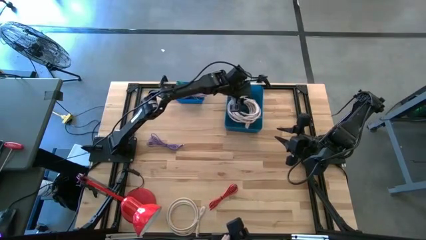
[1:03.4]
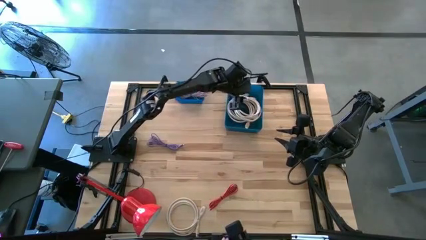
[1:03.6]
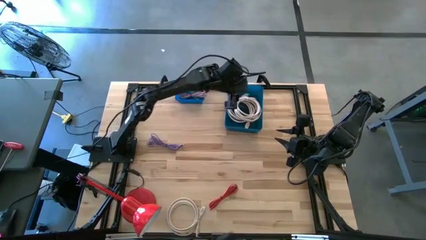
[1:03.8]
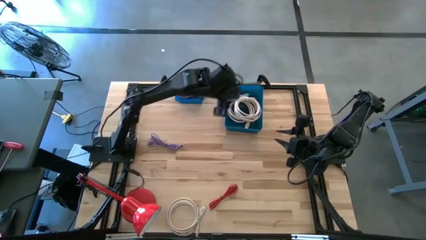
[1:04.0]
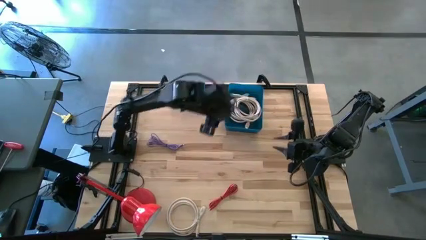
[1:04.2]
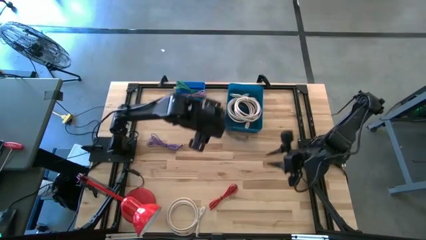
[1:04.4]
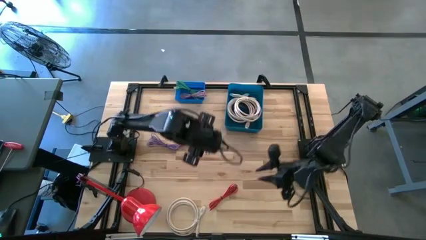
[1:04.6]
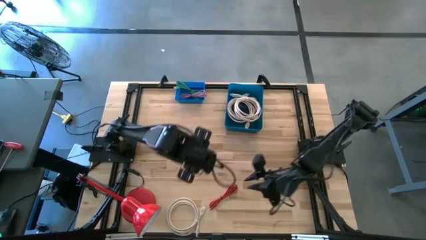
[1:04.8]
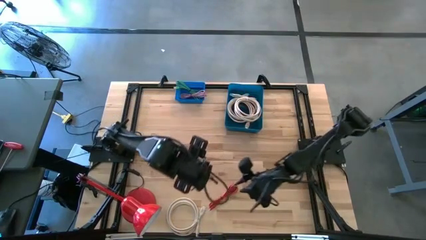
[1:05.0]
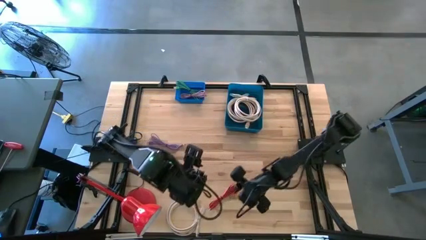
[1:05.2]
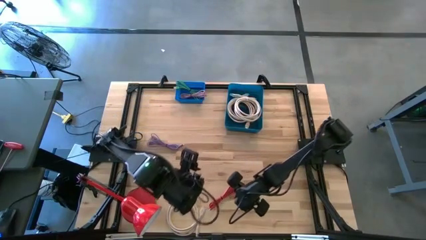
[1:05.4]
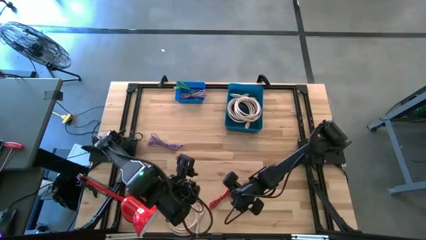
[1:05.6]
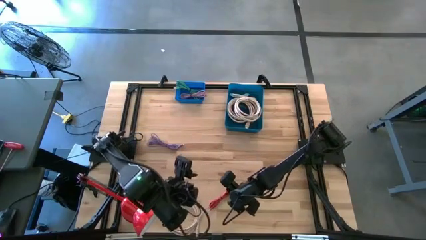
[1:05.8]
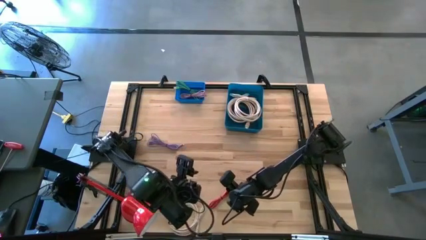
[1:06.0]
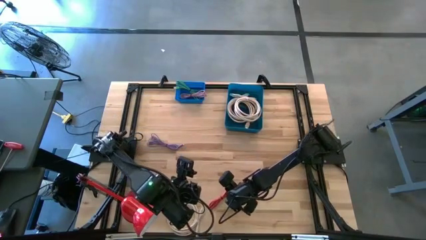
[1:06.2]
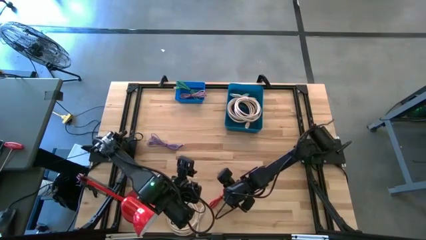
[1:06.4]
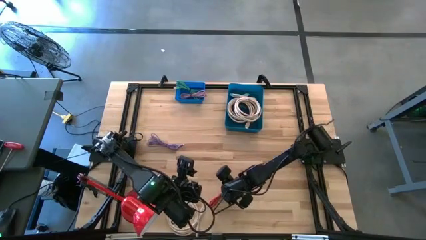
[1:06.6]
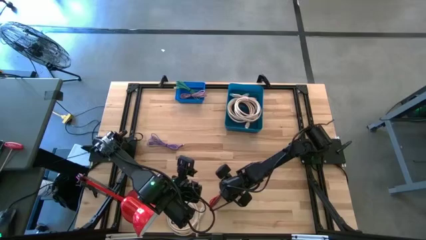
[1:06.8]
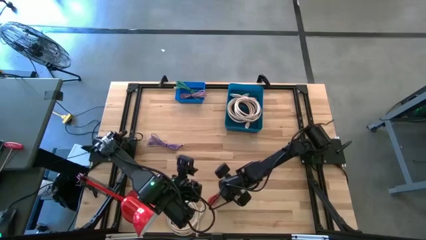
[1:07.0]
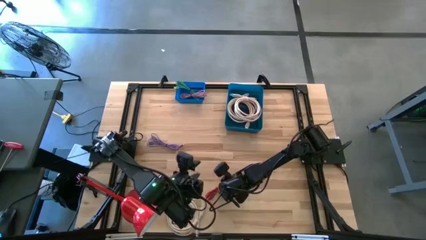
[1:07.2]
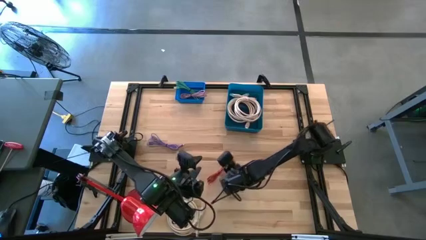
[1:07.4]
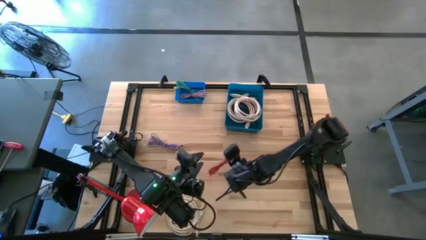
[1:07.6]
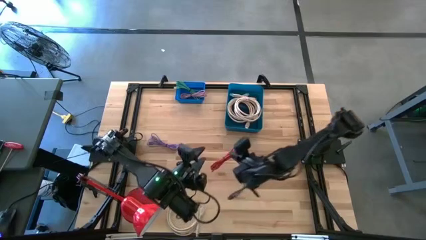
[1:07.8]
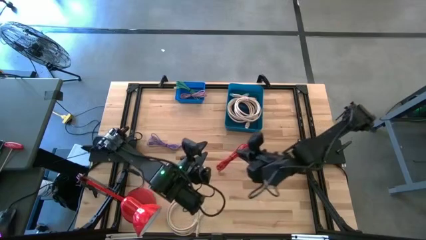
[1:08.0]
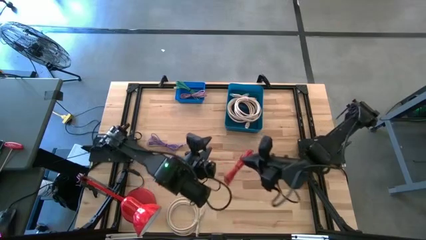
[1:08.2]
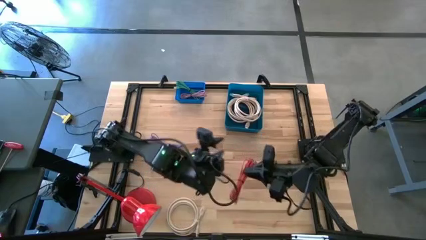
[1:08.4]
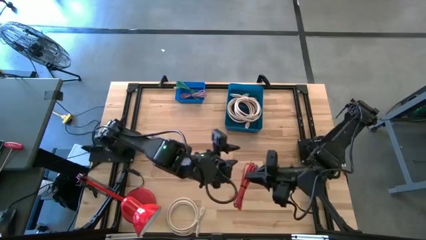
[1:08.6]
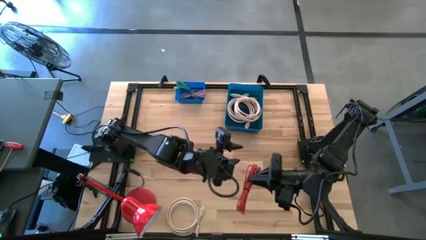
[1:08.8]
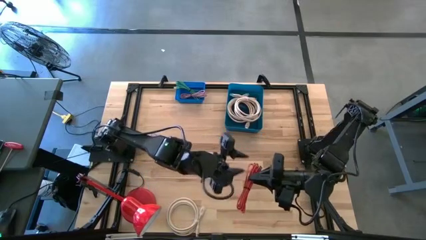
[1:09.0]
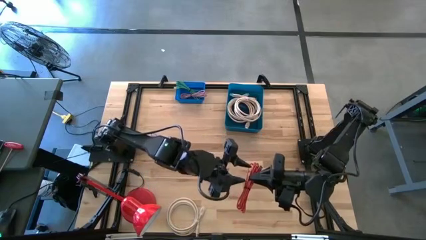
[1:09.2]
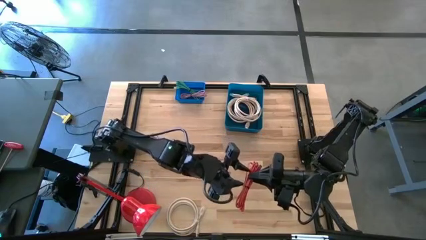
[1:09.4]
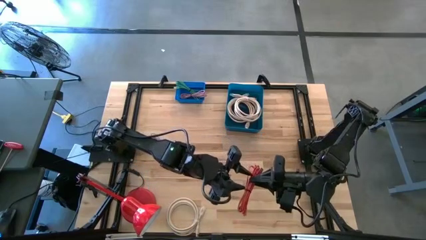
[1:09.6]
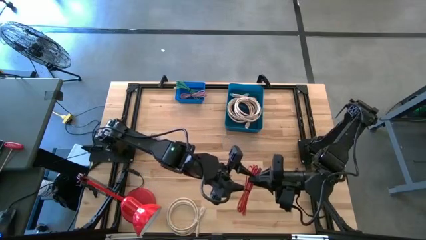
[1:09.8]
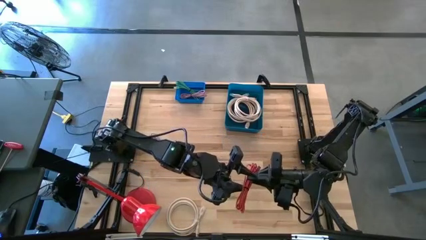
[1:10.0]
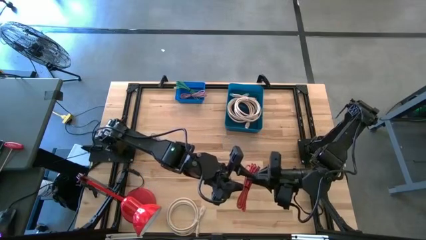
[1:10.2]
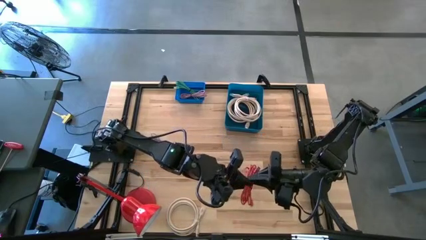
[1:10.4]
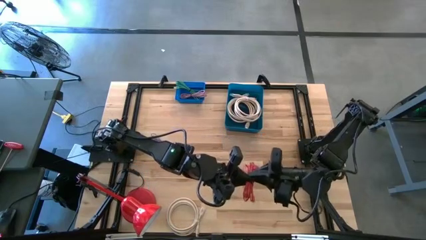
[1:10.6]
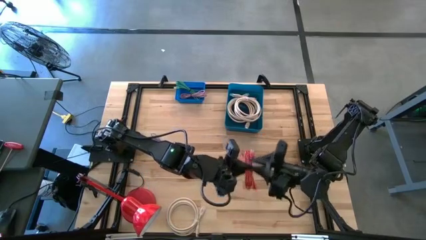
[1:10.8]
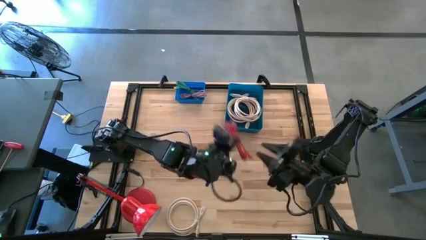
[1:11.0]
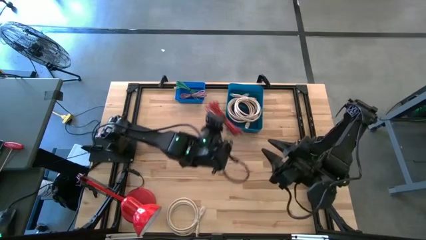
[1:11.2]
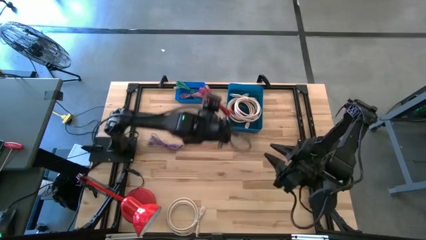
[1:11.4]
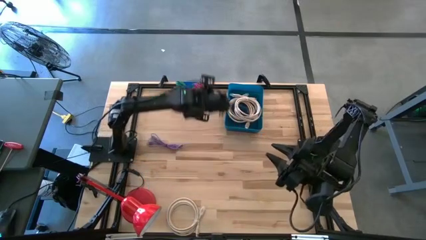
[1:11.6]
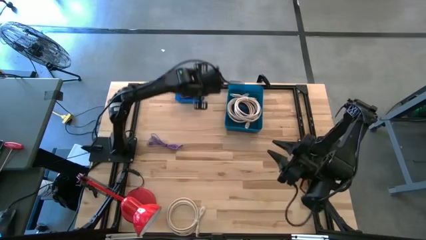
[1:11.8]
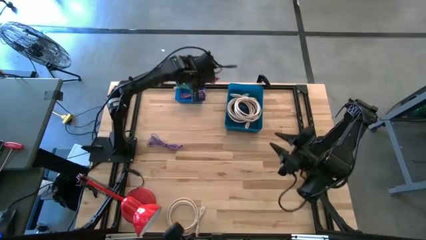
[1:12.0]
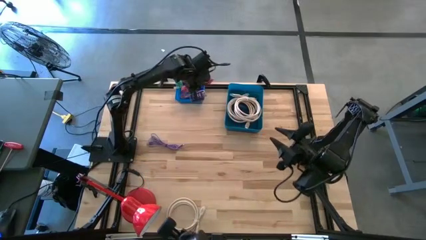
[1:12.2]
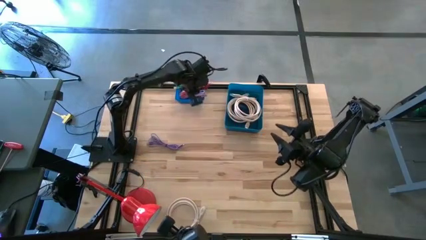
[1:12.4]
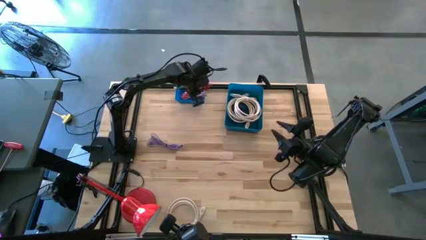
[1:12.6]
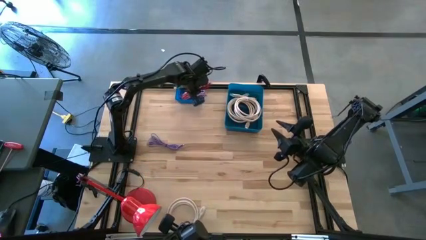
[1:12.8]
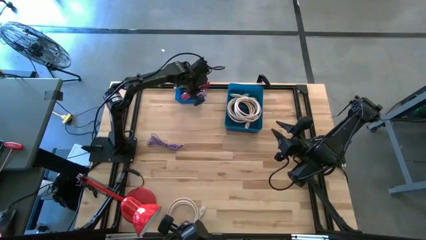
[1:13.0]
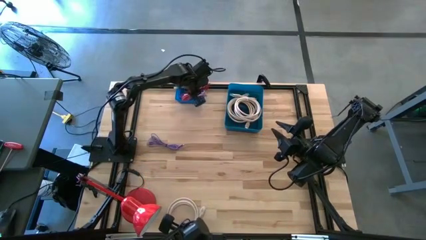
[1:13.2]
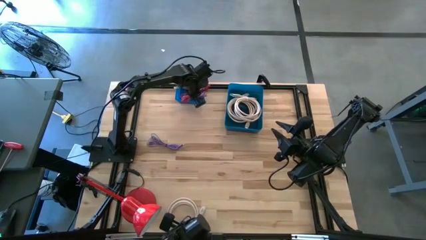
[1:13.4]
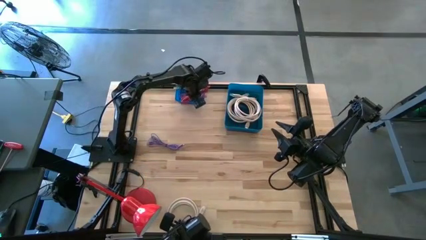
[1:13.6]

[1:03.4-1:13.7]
Task: Pick & Place USB Port
Put the red charger cable into the blue bin

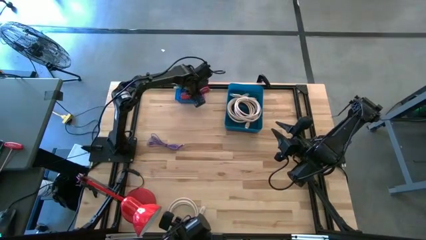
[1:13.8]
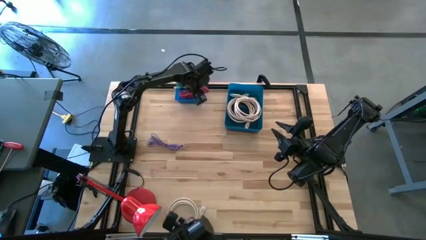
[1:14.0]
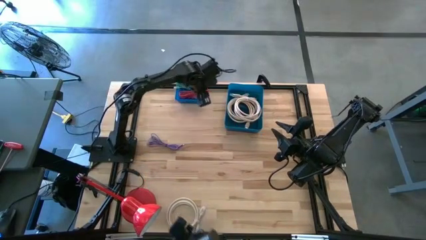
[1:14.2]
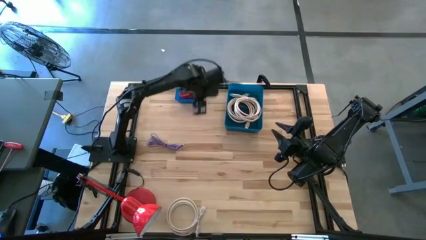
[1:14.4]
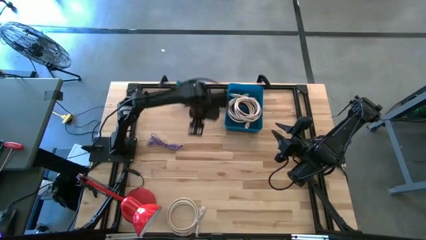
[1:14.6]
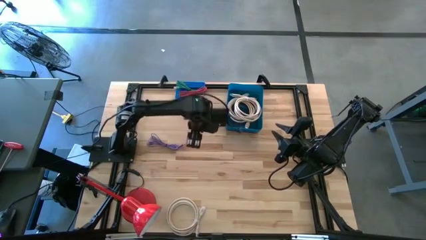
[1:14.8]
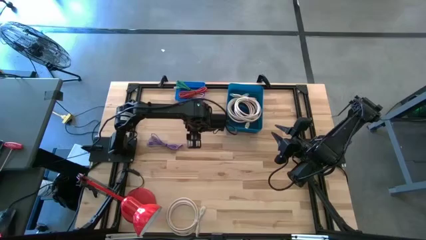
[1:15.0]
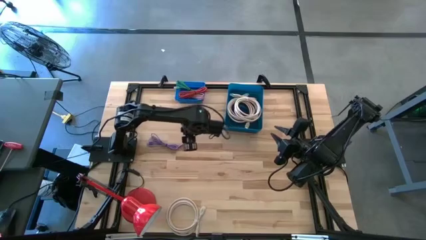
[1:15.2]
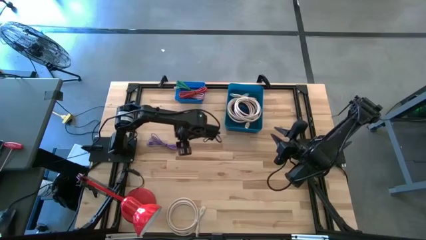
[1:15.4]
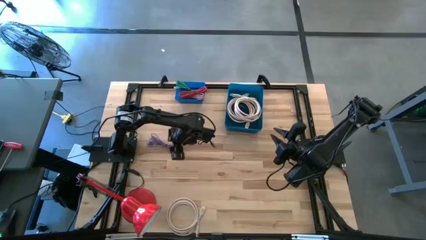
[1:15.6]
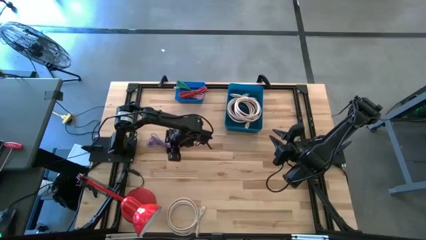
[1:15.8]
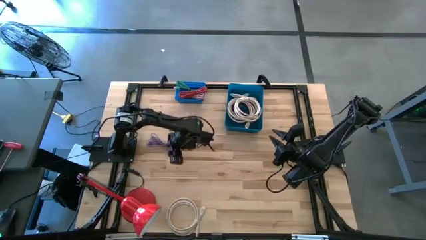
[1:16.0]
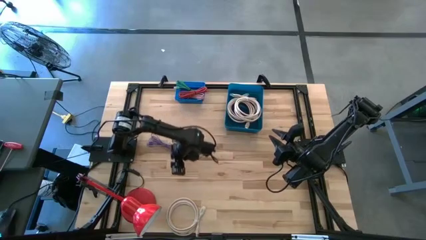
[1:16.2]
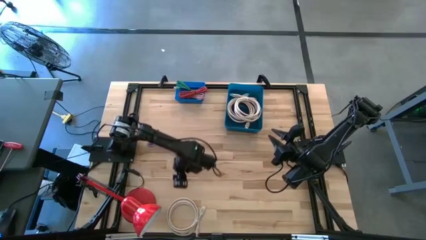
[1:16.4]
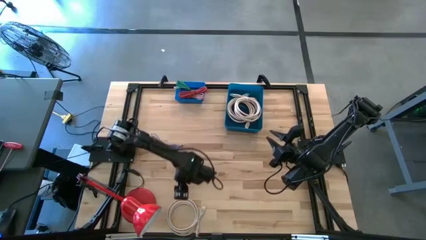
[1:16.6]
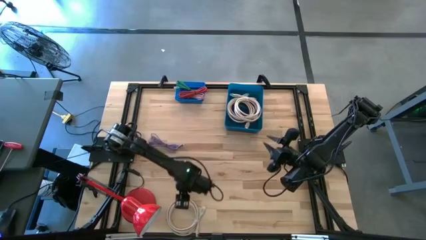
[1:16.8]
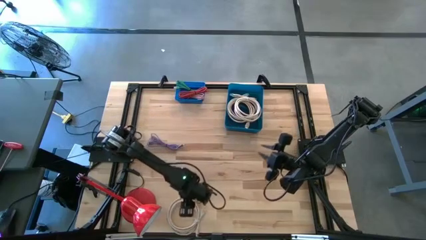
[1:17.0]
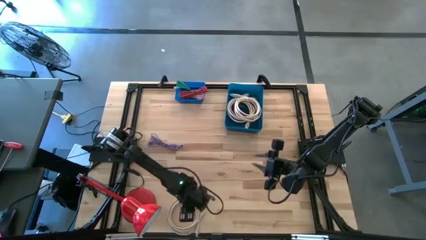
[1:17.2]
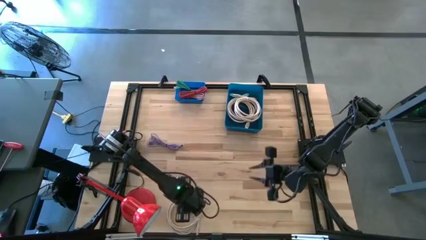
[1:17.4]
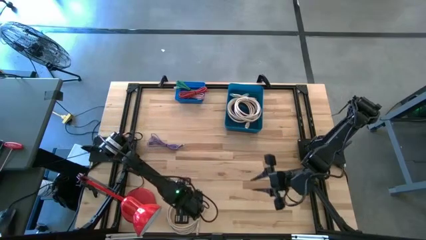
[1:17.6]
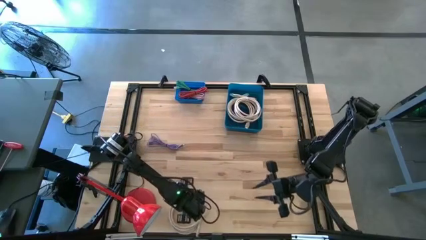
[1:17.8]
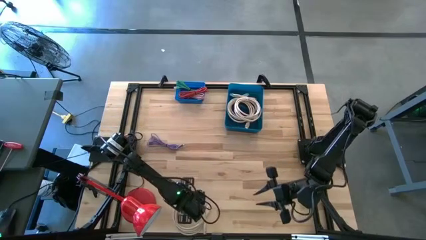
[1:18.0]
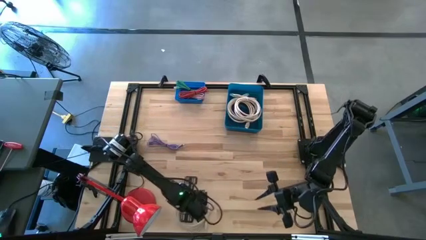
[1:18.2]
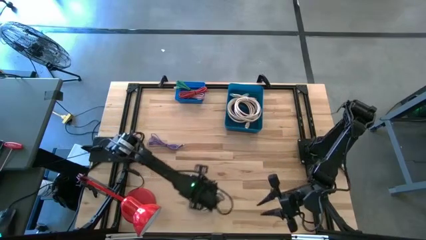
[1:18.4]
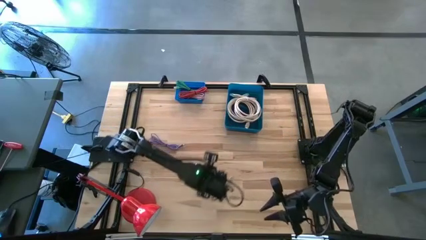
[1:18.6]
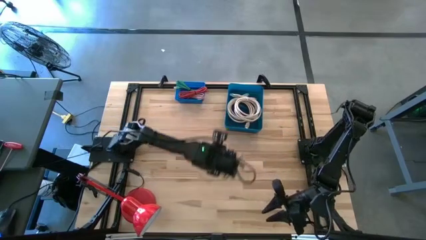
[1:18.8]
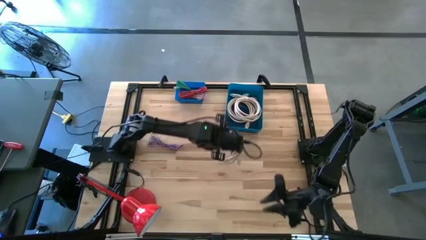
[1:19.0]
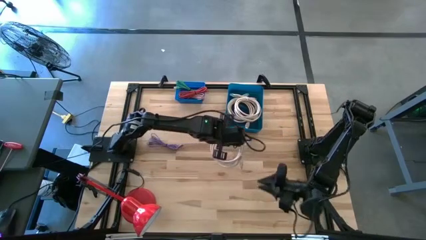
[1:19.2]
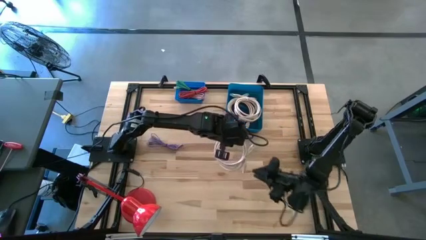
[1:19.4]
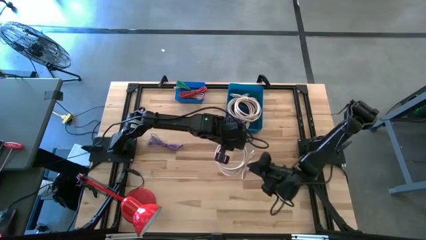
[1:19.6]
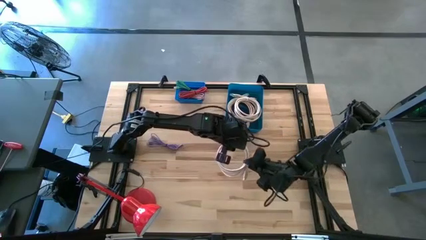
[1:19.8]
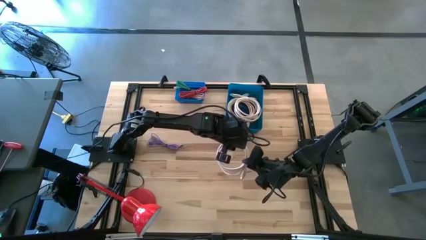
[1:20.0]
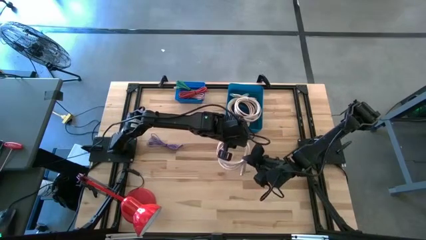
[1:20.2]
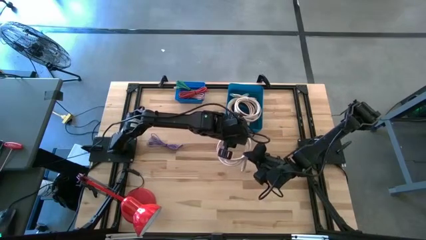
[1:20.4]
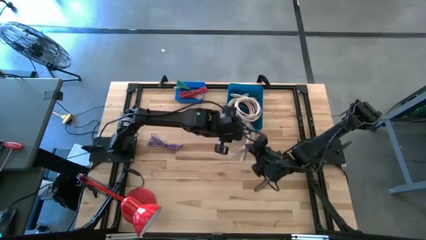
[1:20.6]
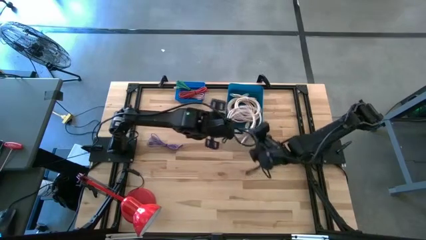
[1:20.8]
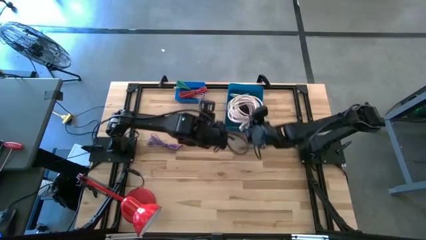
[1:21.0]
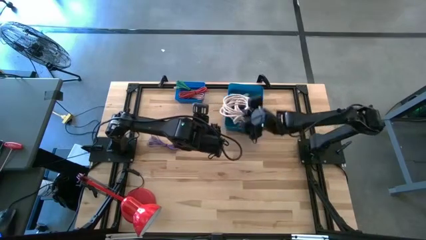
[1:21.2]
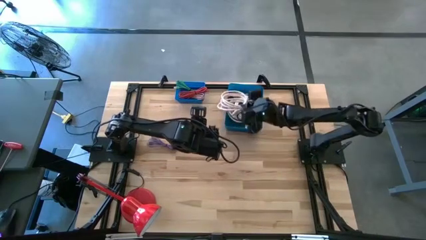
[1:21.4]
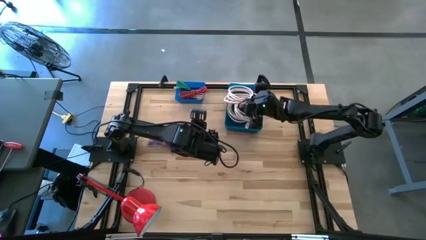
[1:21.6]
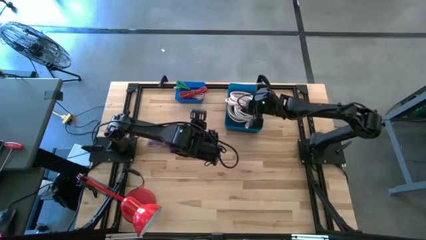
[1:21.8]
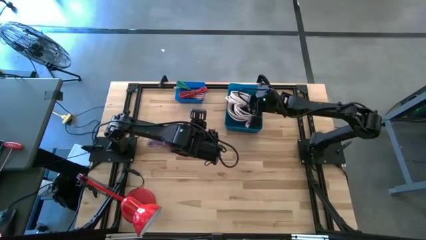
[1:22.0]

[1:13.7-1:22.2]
Put the white HDMI cable into the dark blue bin
